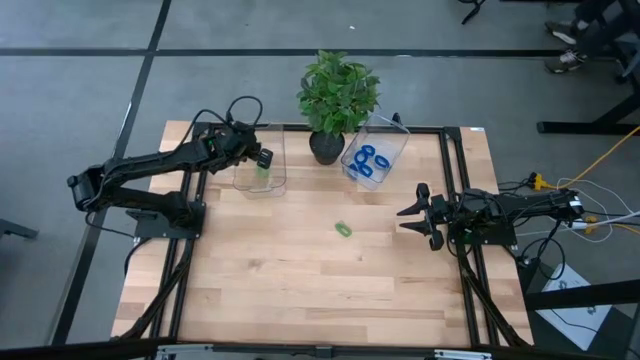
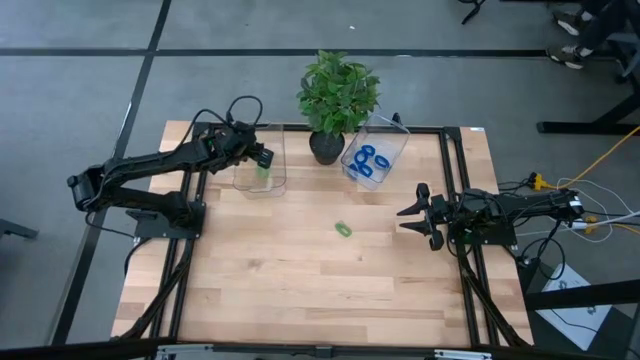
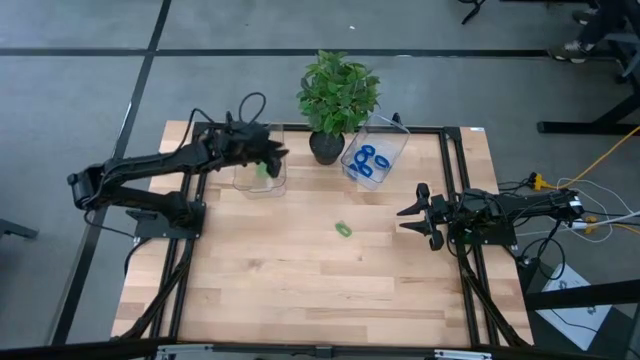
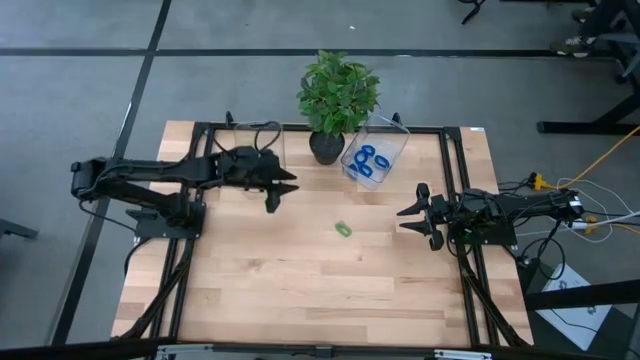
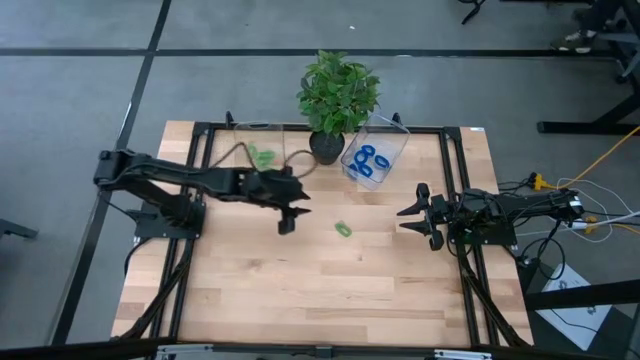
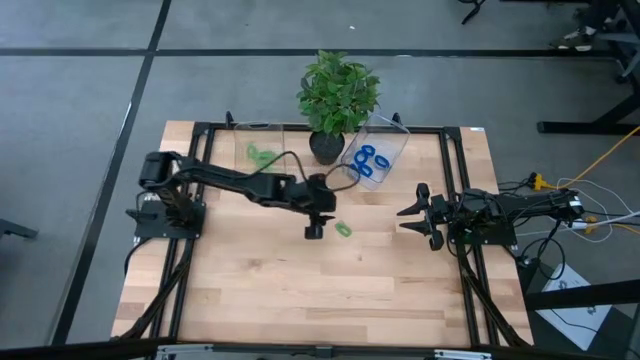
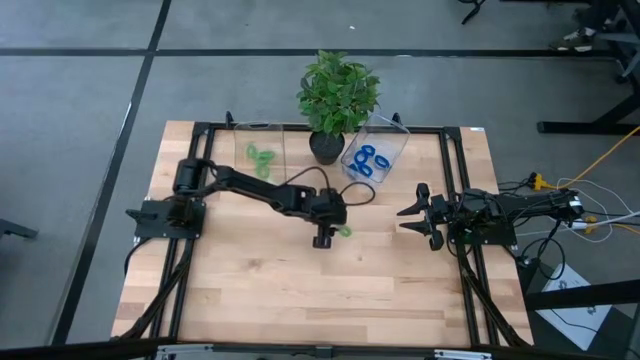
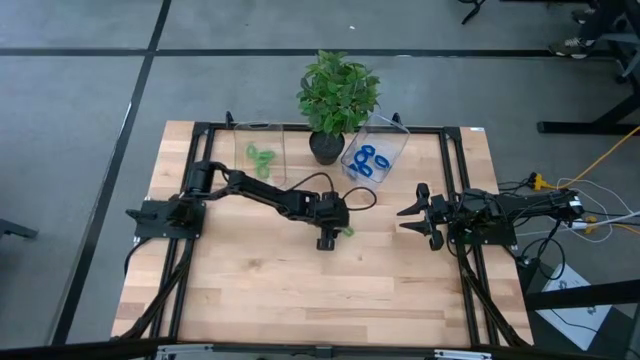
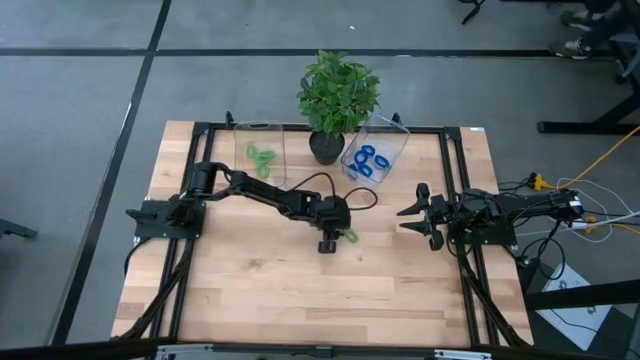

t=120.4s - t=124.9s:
Task: Sort spring keychains
Put the green spring keychain into the left transparent bin

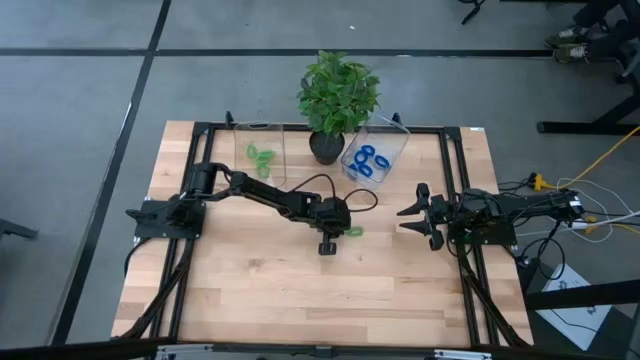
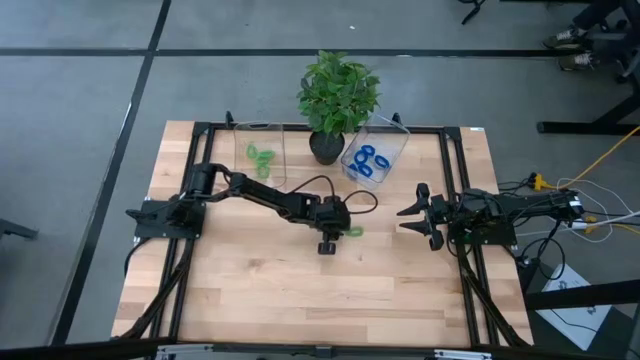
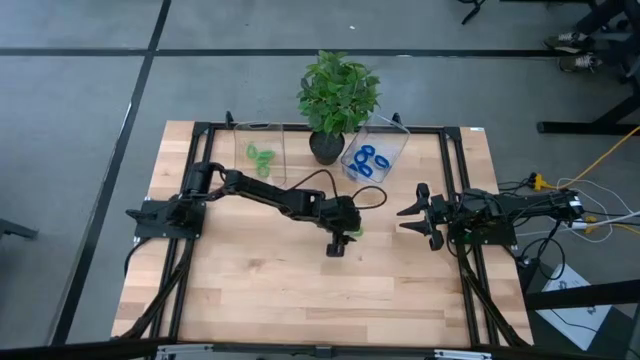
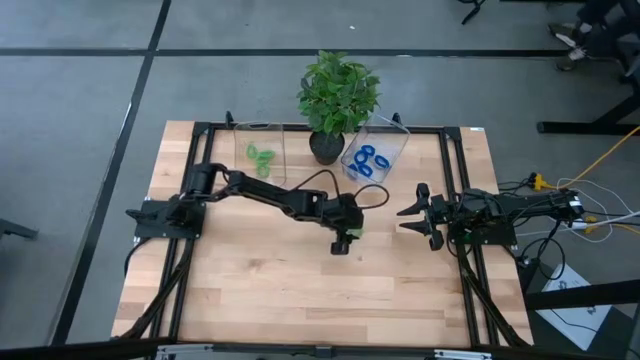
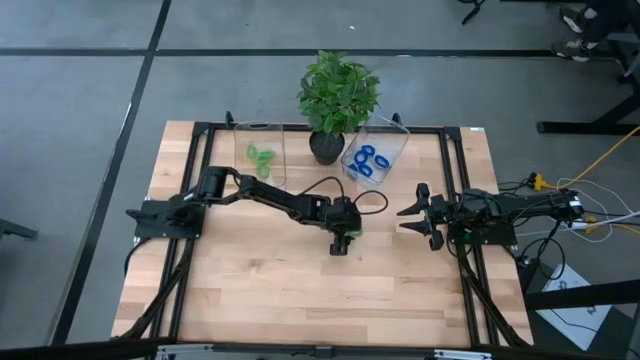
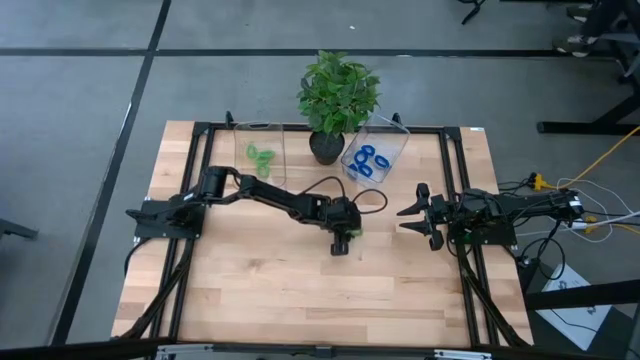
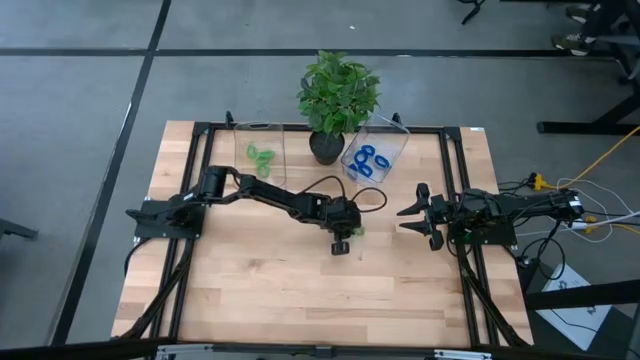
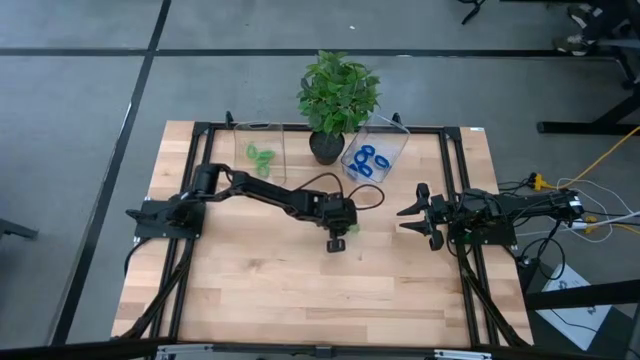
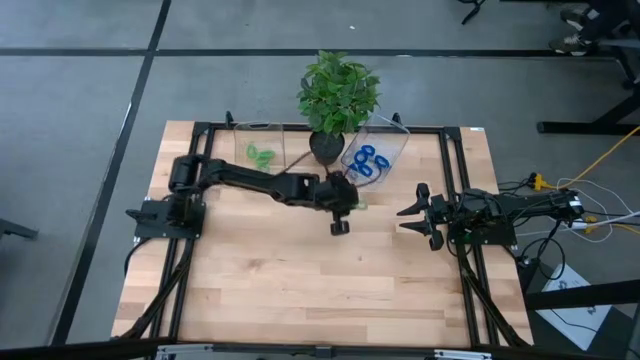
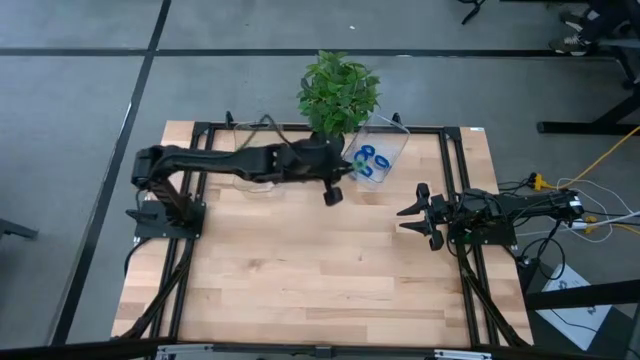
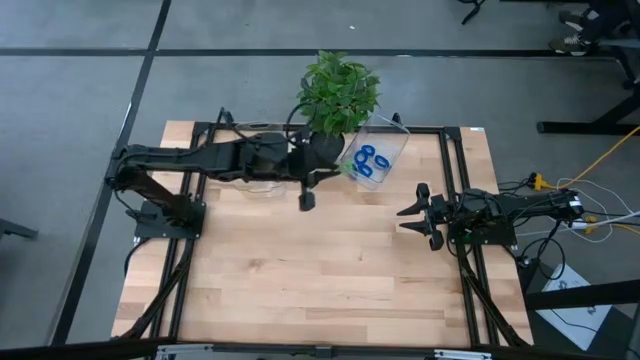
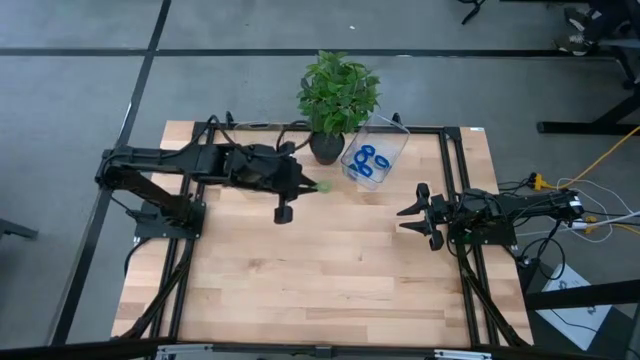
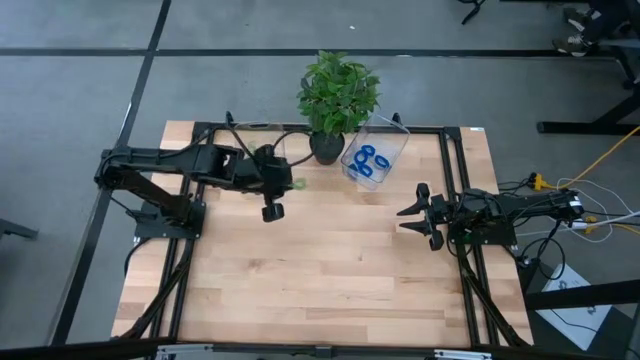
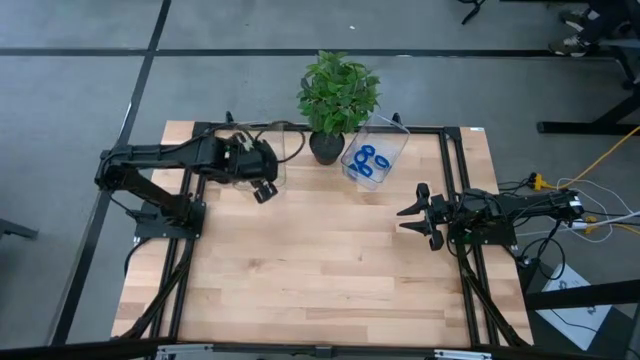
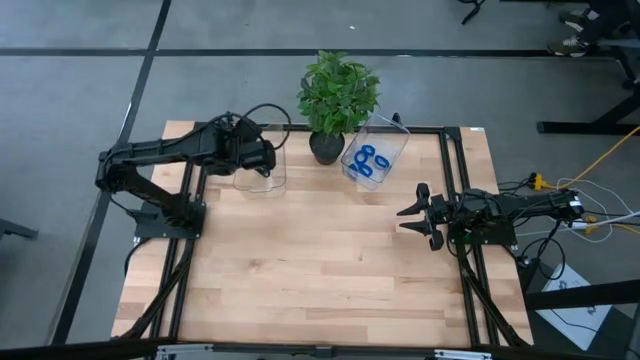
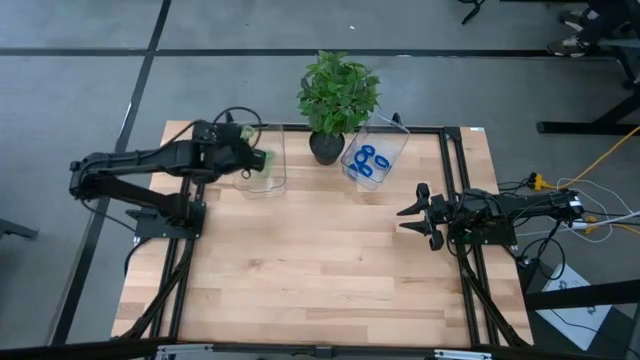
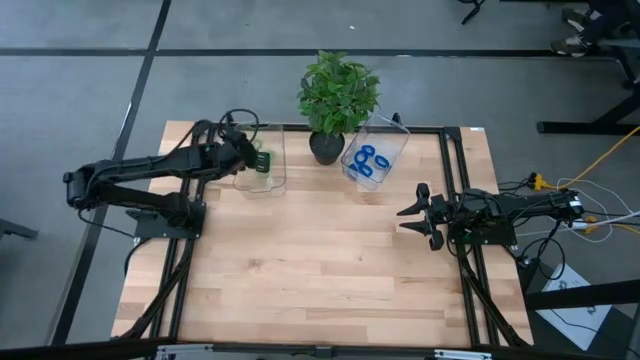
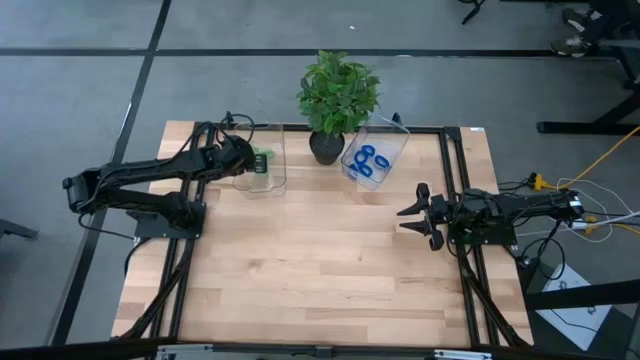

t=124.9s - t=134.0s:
Put the green spring keychain into the left transparent bin

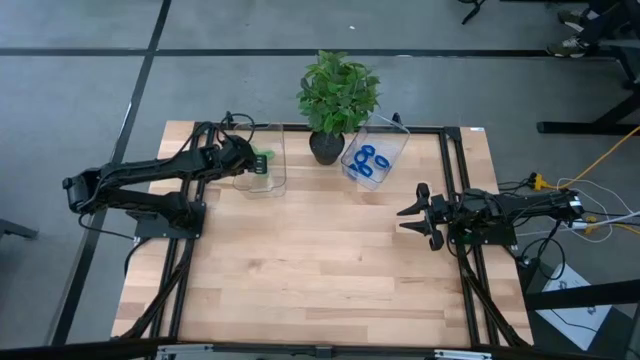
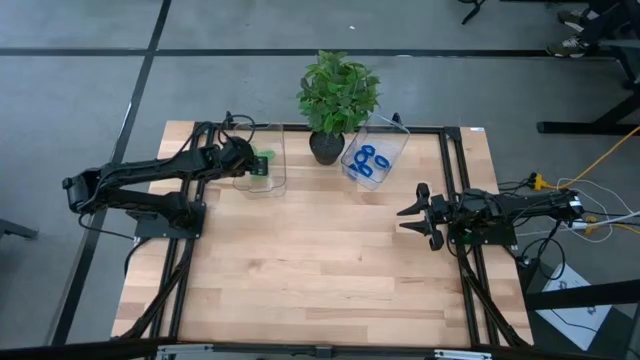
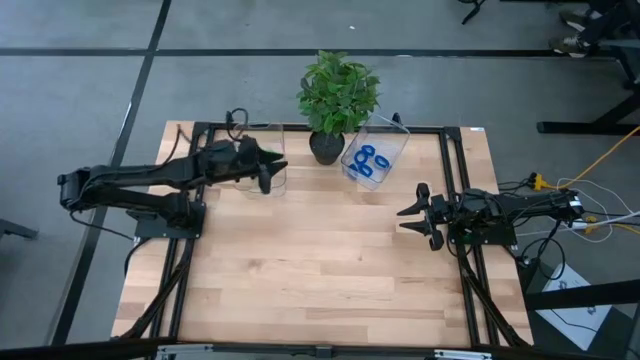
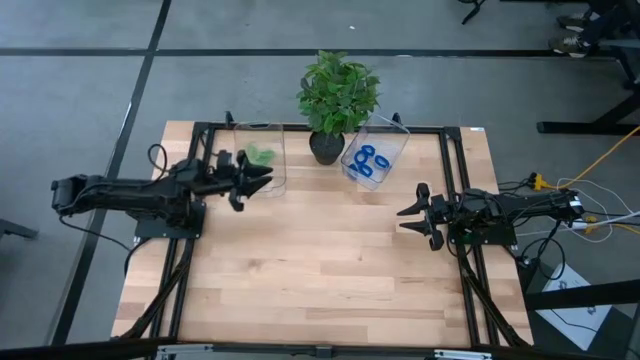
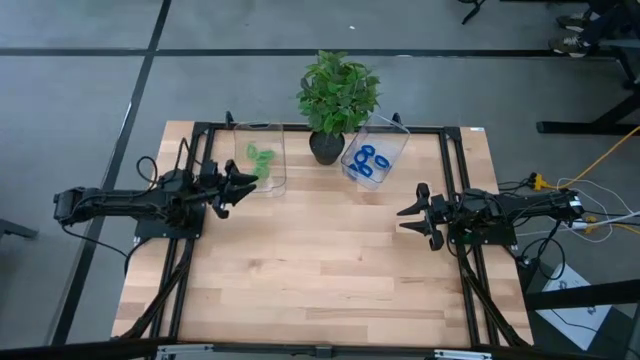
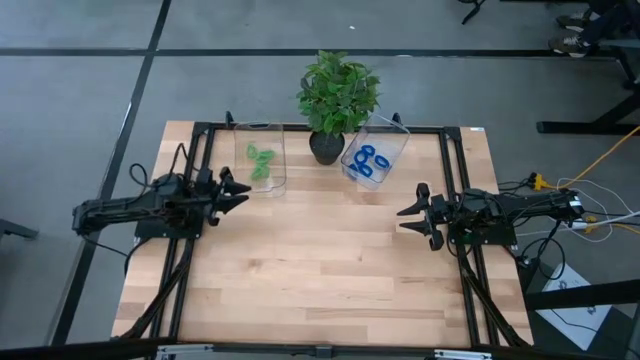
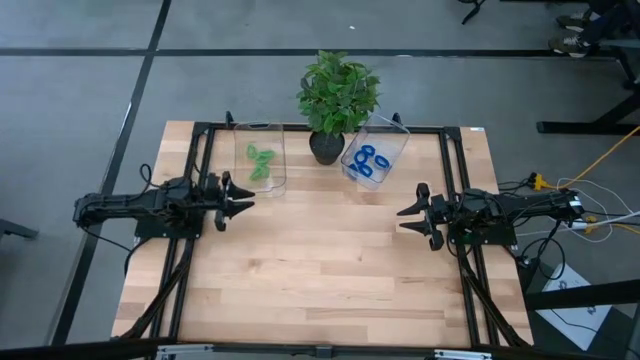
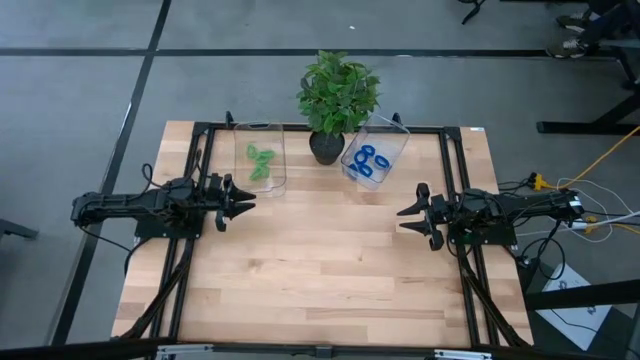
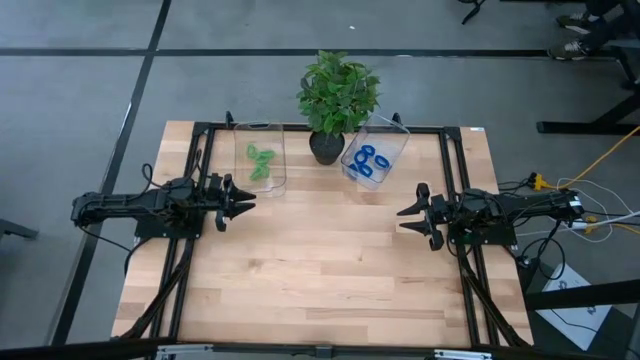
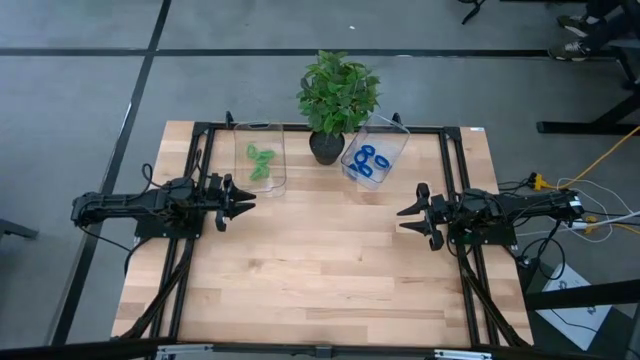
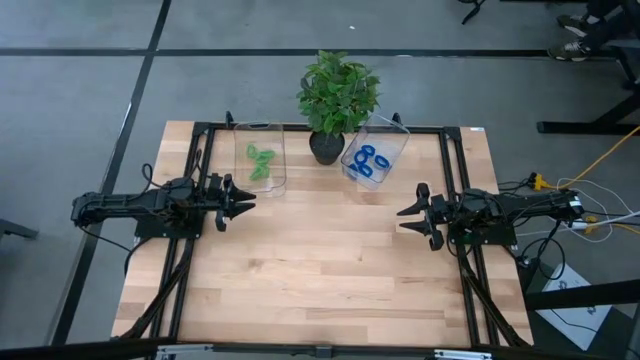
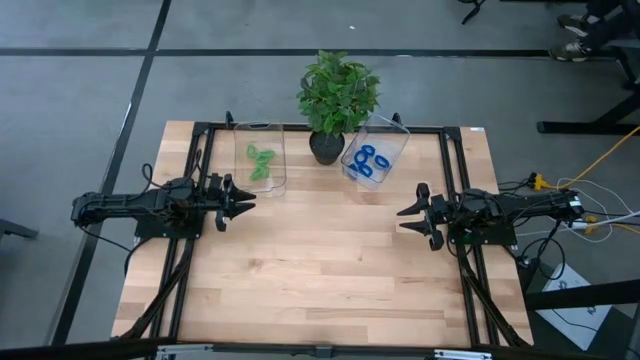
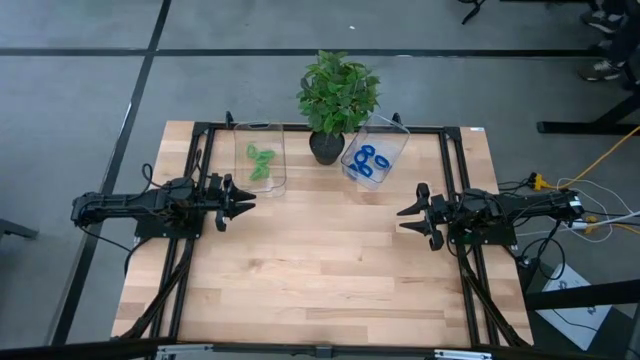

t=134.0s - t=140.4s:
Return to Home Position
